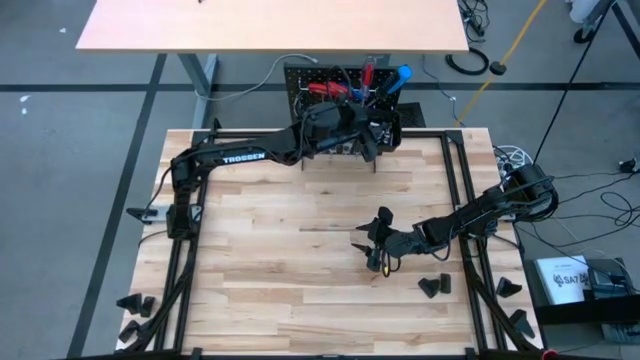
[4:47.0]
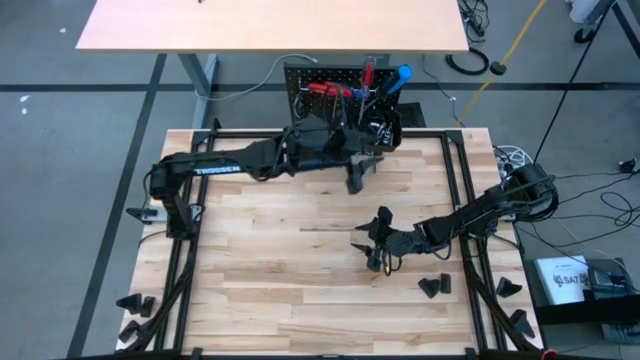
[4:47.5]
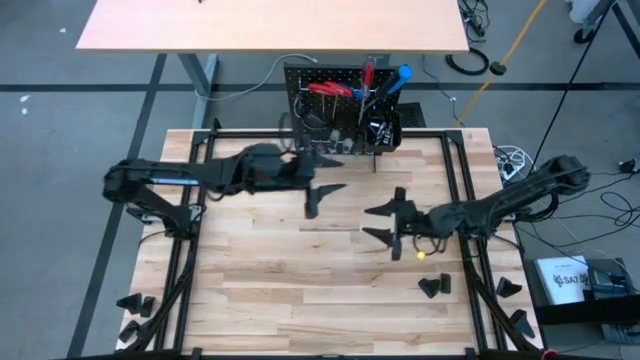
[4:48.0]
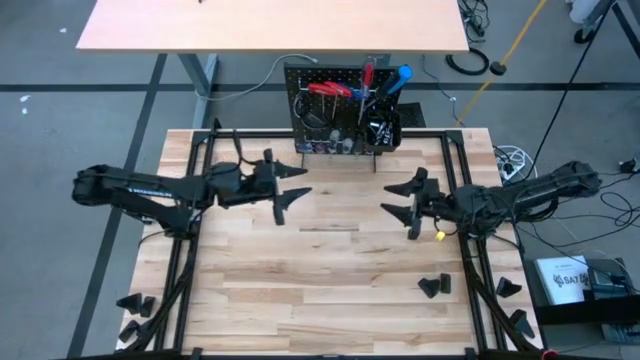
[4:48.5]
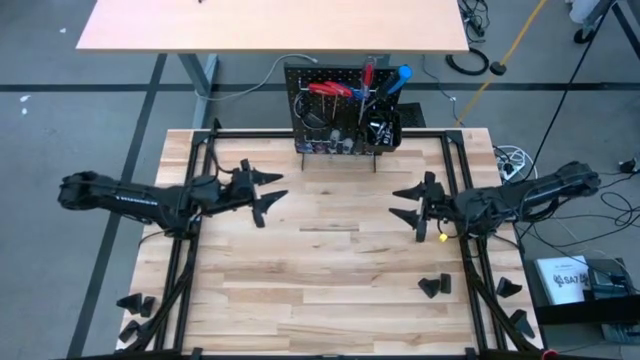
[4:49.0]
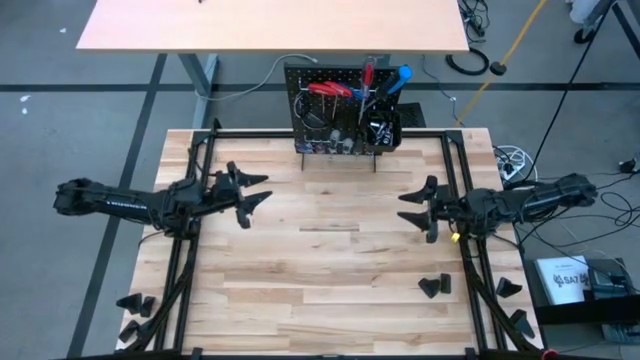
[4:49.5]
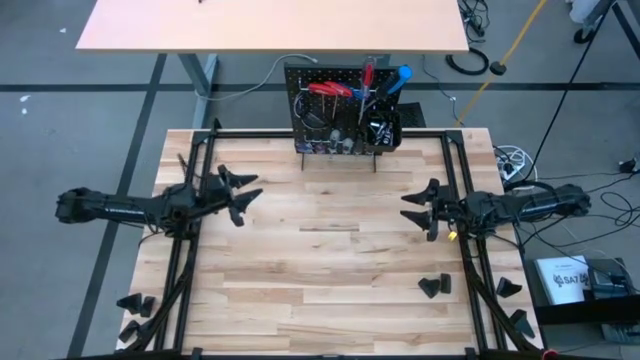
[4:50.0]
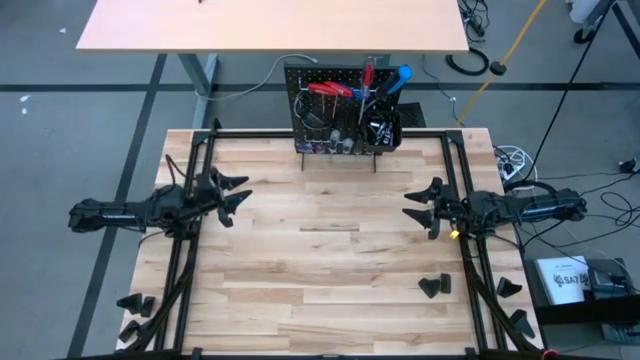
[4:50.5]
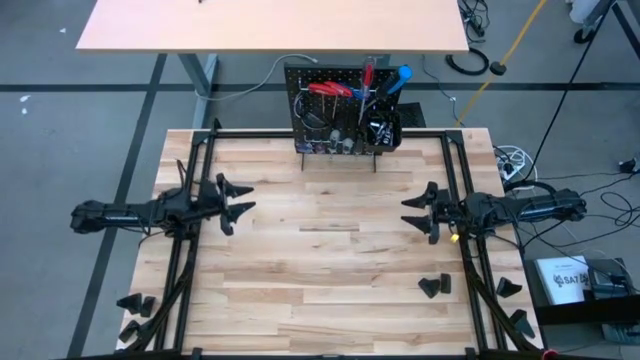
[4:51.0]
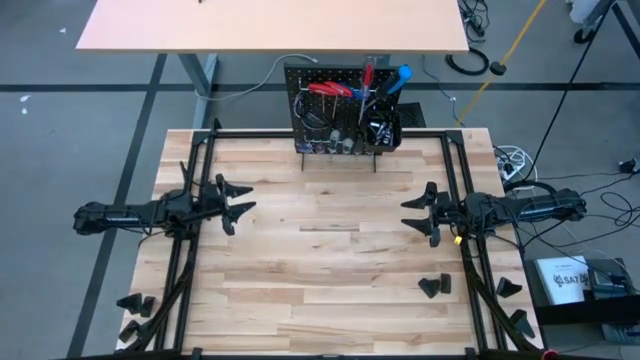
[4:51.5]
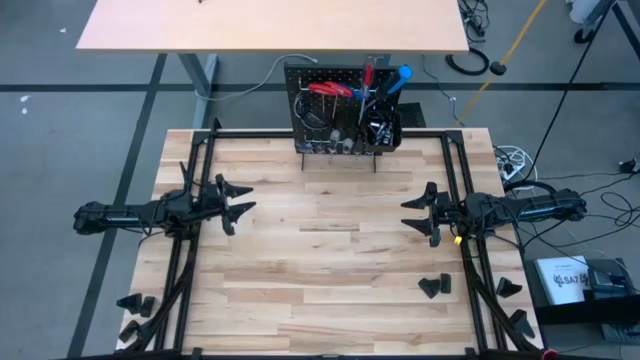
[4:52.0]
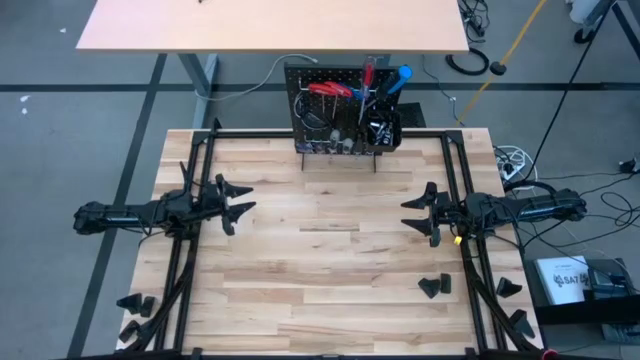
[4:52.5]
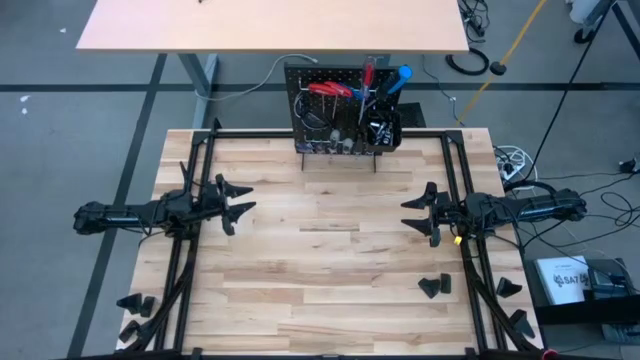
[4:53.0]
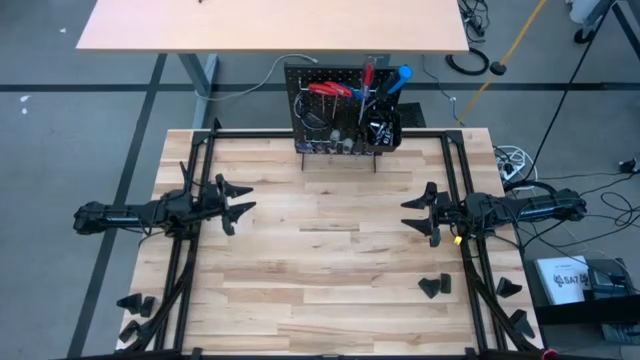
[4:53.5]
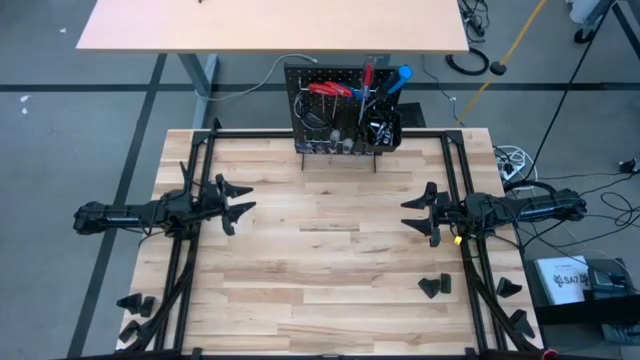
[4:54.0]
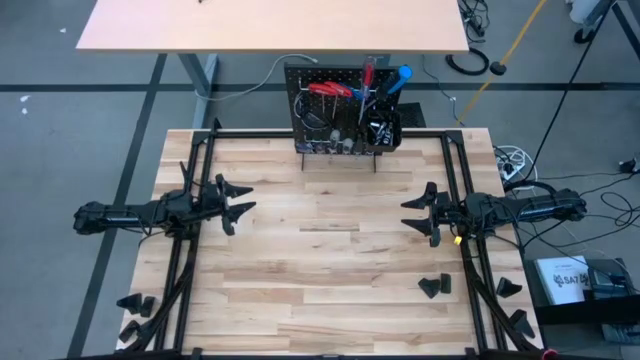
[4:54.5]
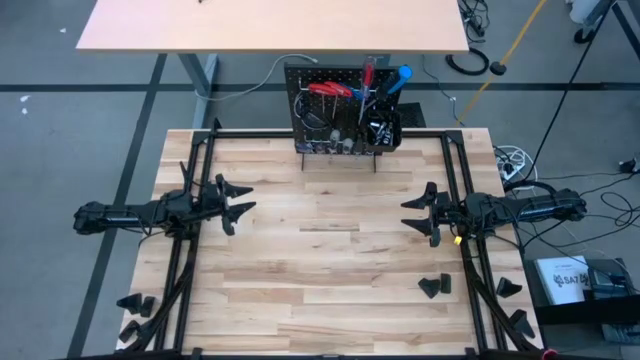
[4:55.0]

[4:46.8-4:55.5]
Task: Hang tools onto peg board
Return to Home Position

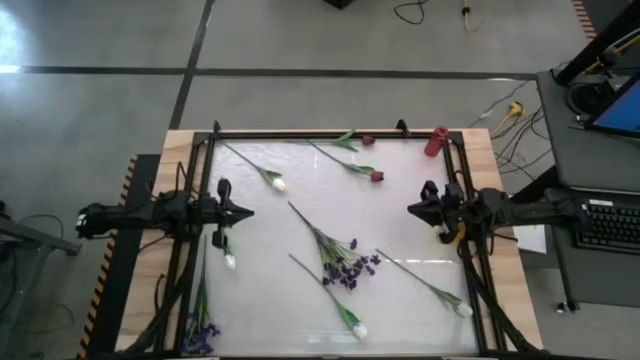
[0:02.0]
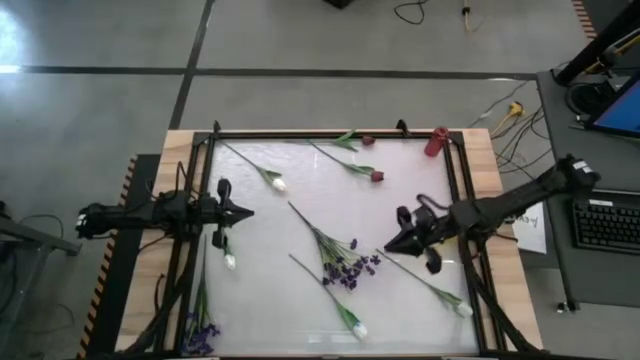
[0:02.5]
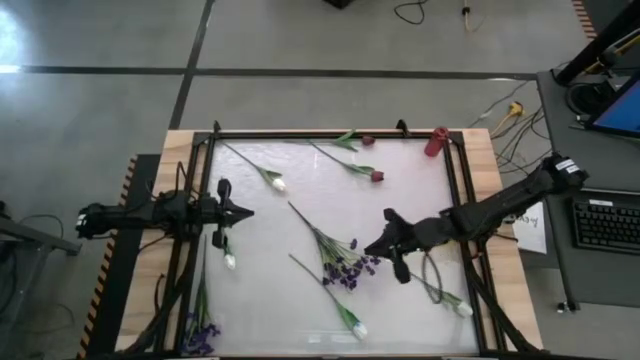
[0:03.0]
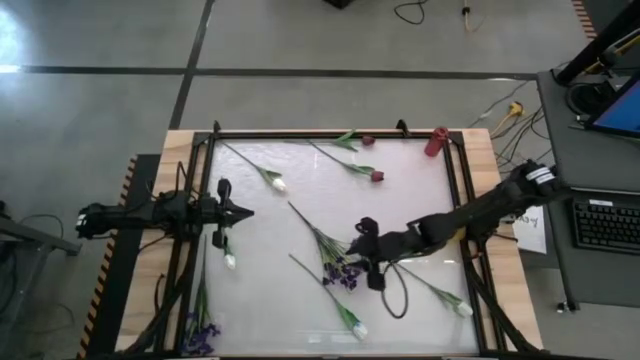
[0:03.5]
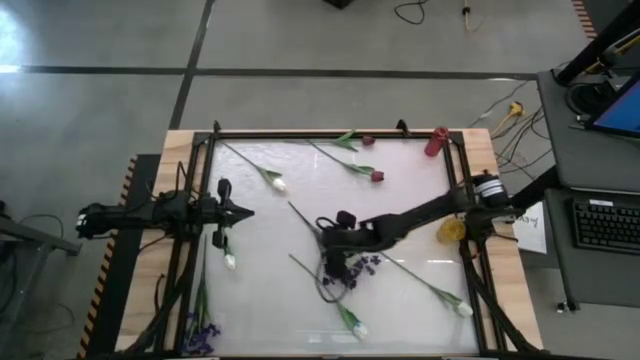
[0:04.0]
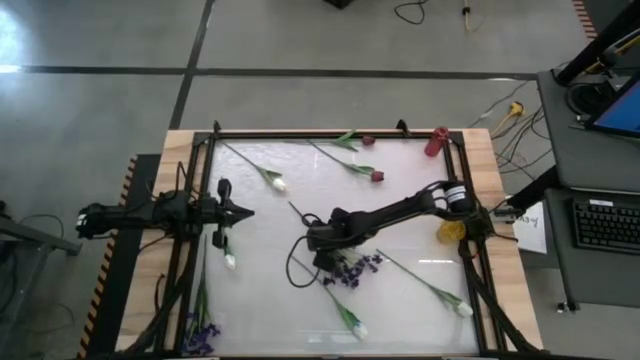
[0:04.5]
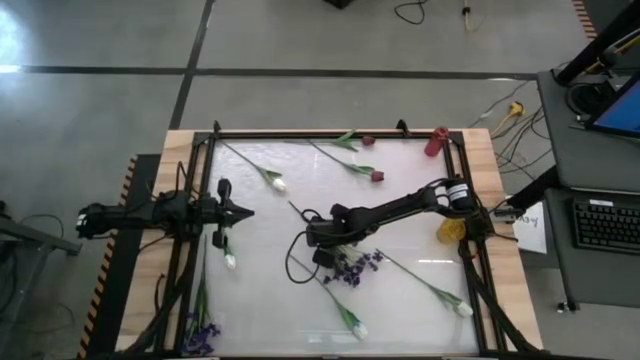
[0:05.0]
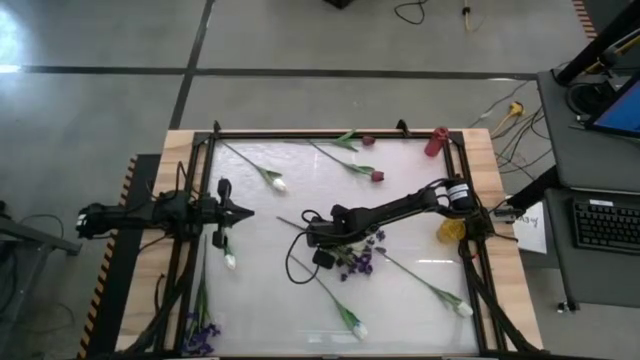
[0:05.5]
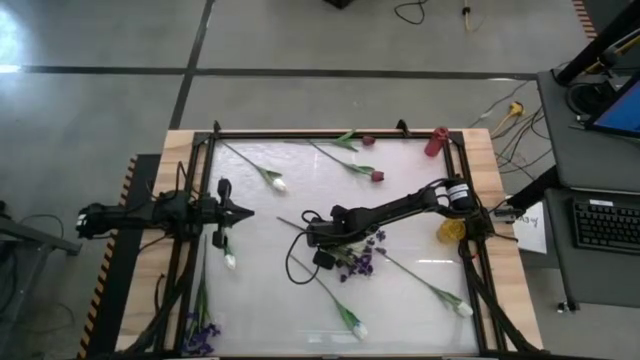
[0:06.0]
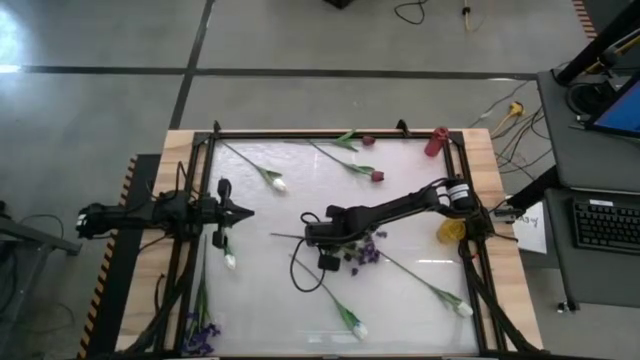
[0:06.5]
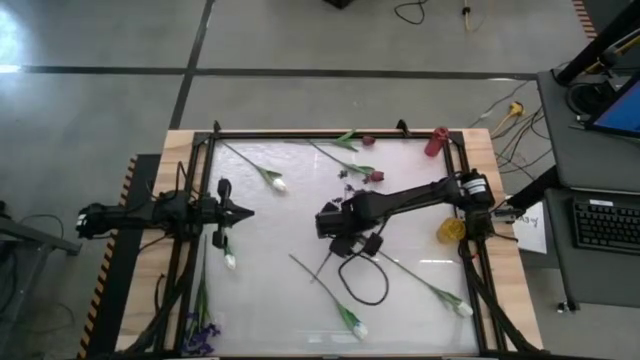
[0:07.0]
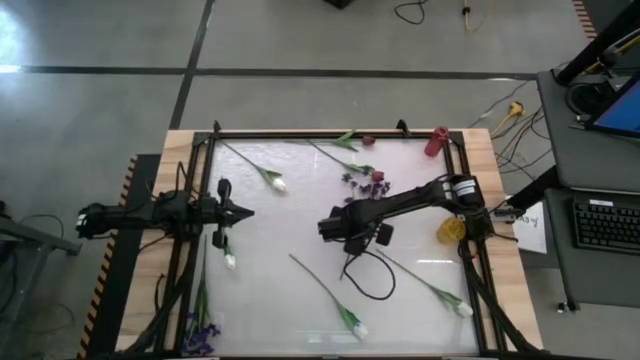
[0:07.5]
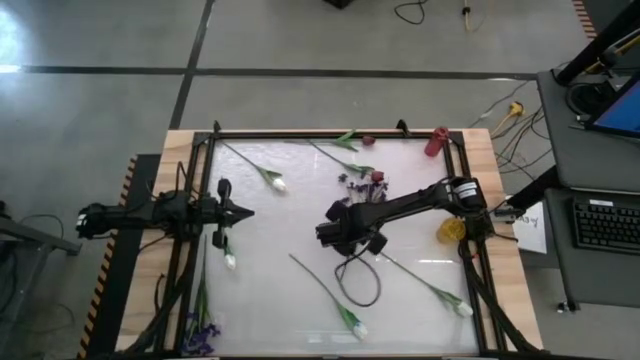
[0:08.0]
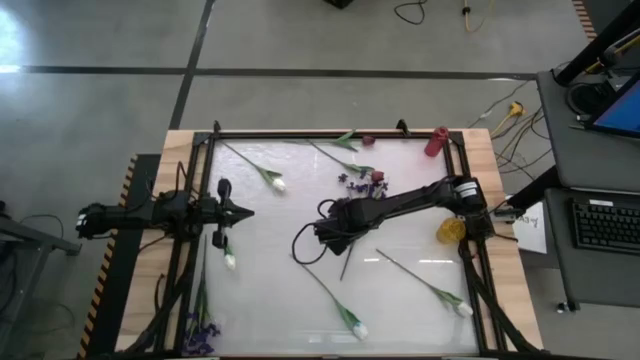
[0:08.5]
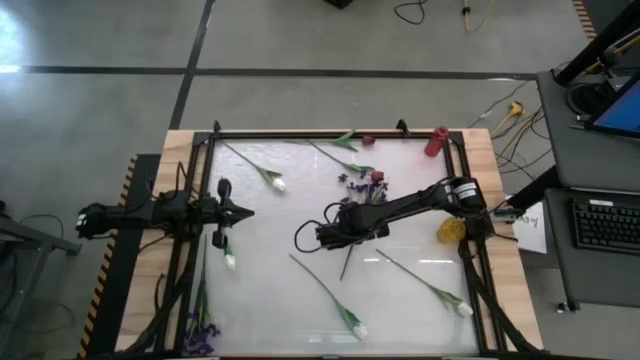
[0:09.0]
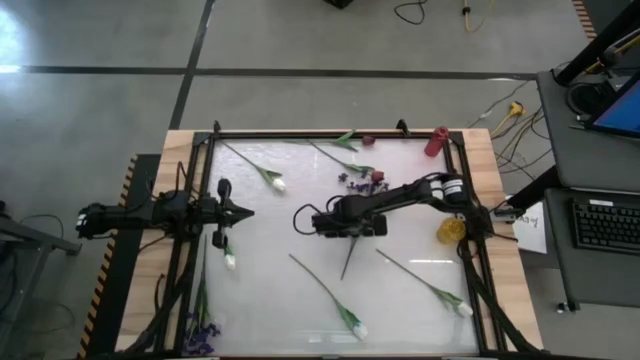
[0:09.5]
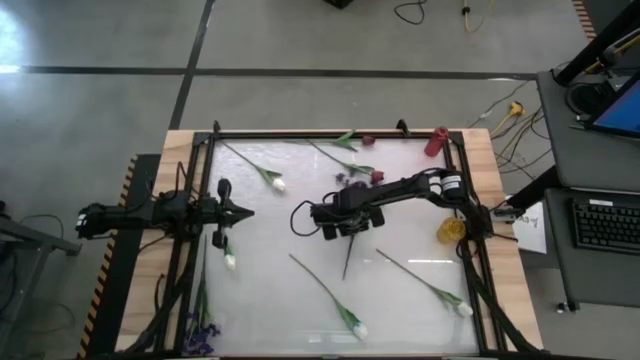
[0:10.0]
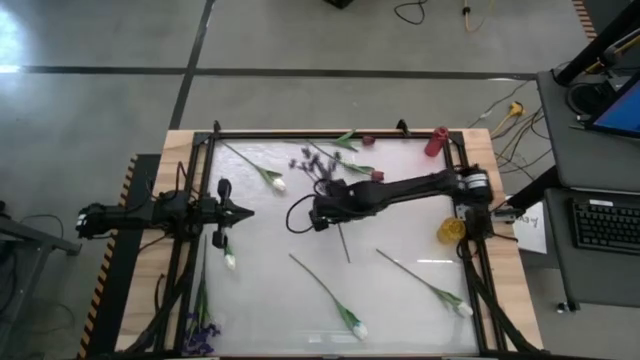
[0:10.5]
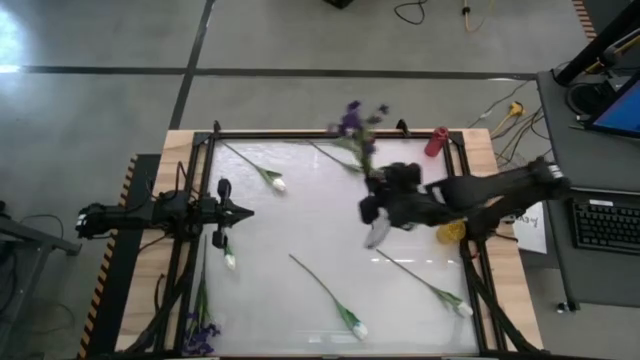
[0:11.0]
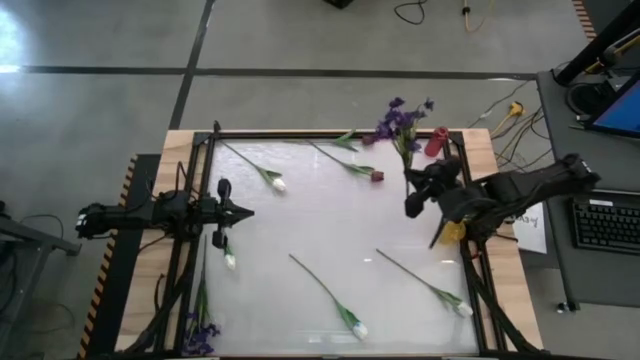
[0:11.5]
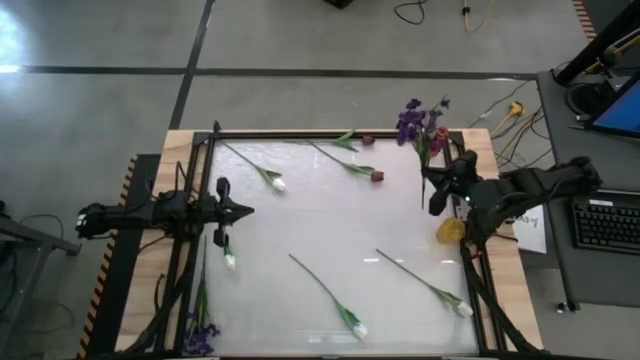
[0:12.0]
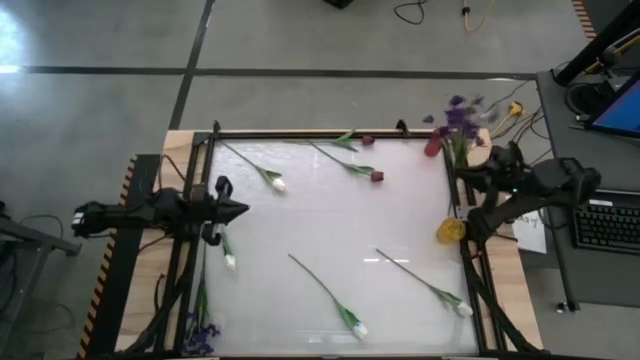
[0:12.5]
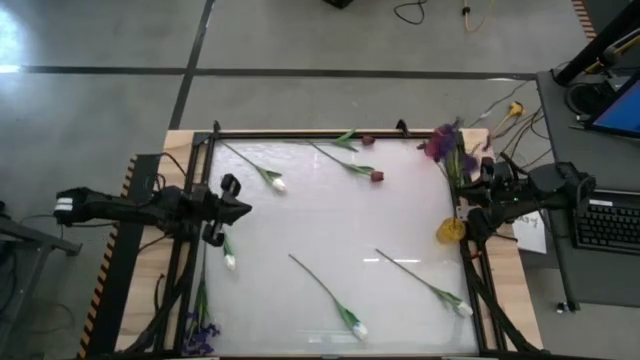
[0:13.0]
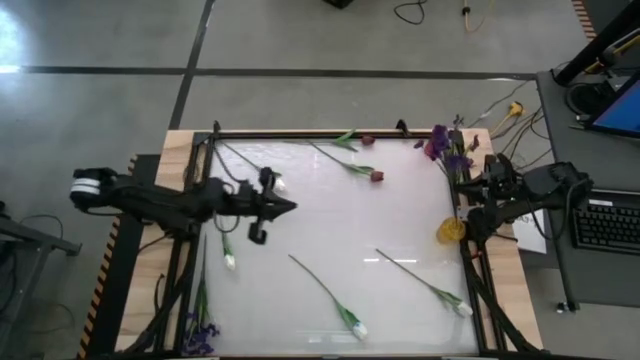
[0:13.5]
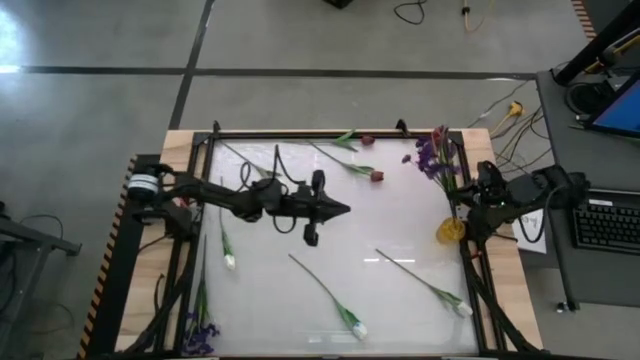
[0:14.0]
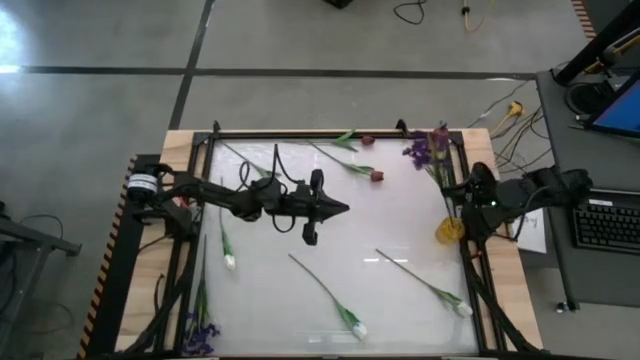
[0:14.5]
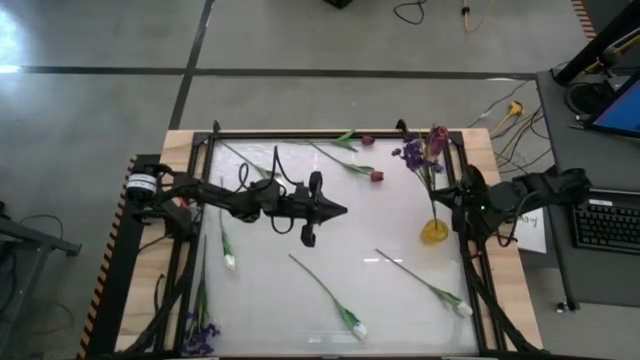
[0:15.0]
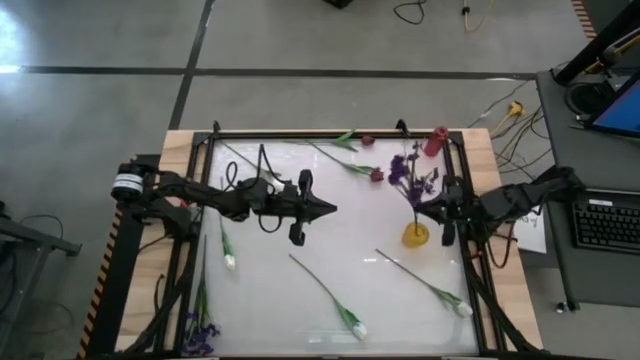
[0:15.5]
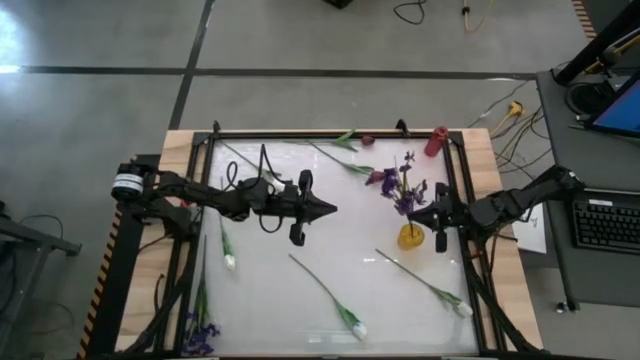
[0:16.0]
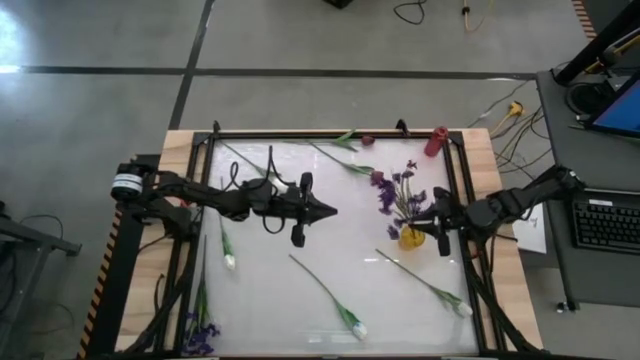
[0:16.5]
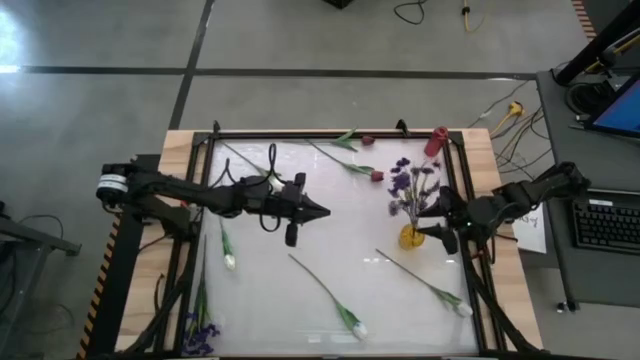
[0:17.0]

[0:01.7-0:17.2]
Task: Sort flowers into vase by color
Put the right violet flower into the yellow vase
